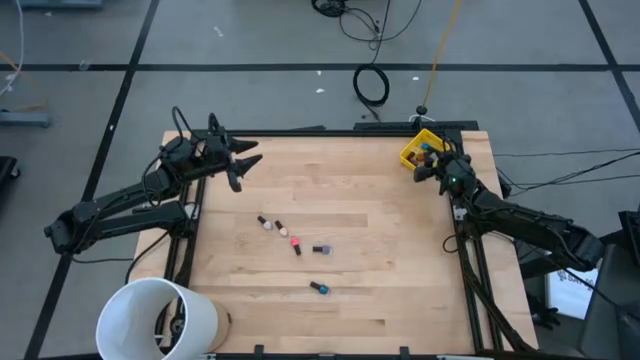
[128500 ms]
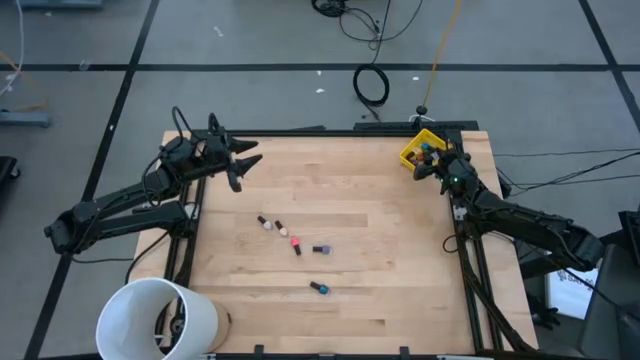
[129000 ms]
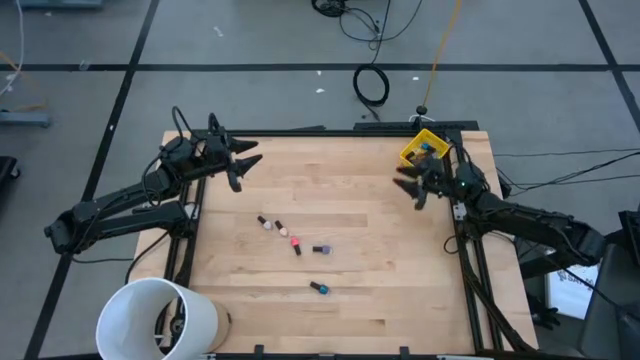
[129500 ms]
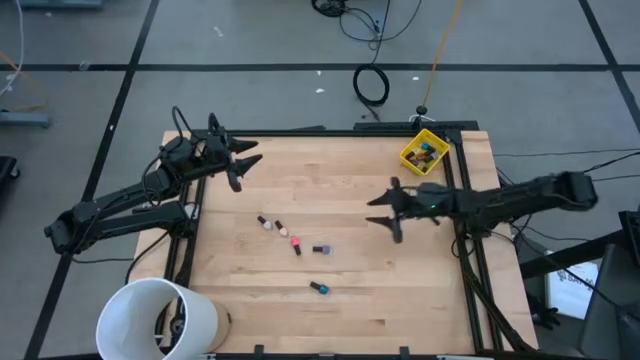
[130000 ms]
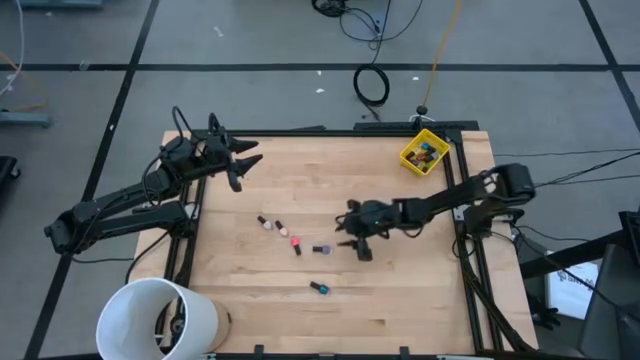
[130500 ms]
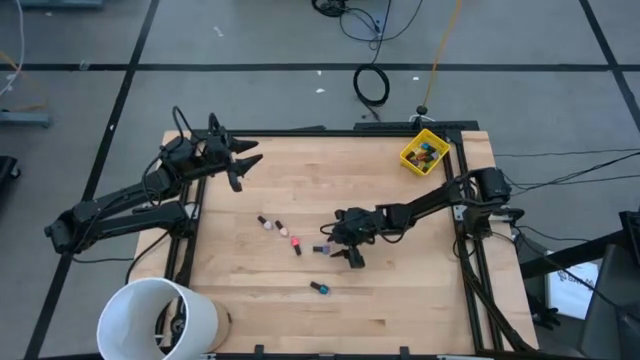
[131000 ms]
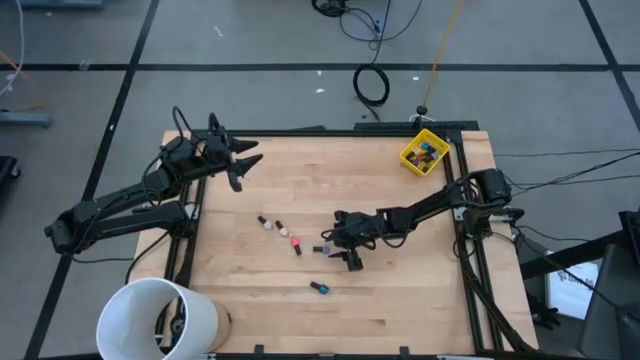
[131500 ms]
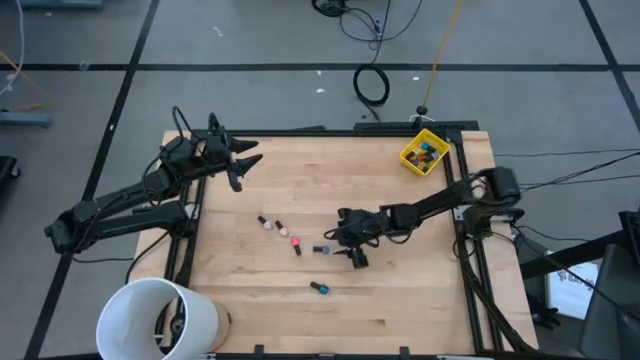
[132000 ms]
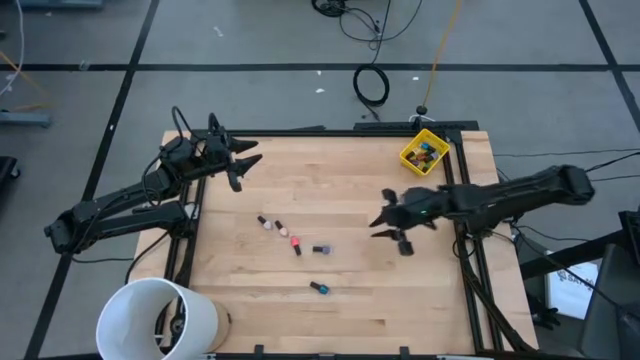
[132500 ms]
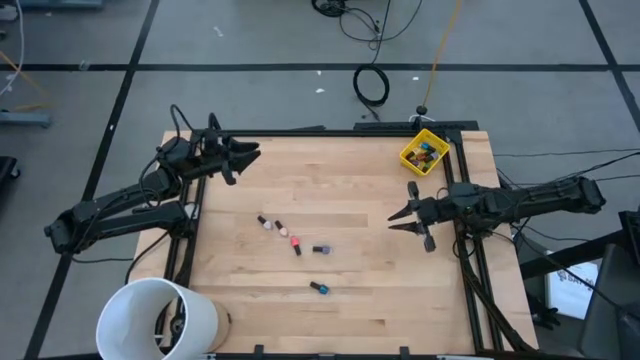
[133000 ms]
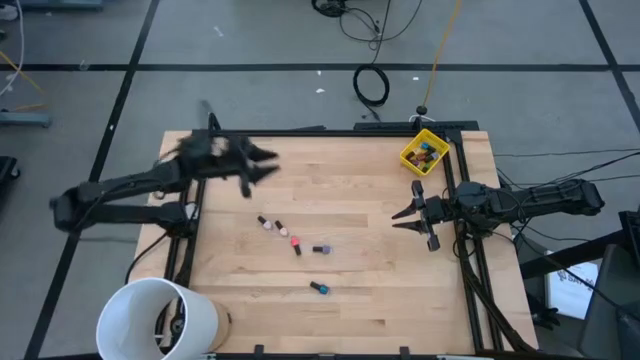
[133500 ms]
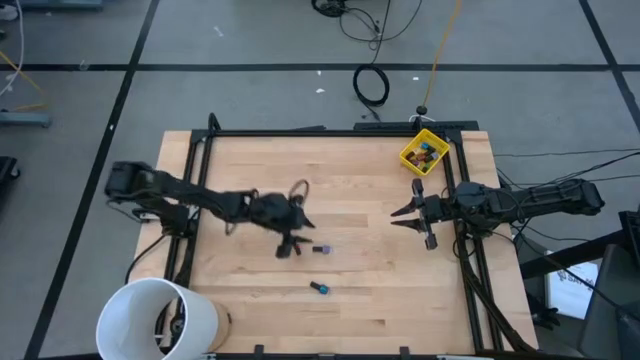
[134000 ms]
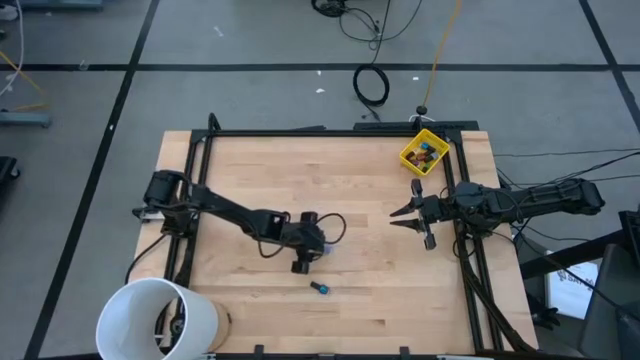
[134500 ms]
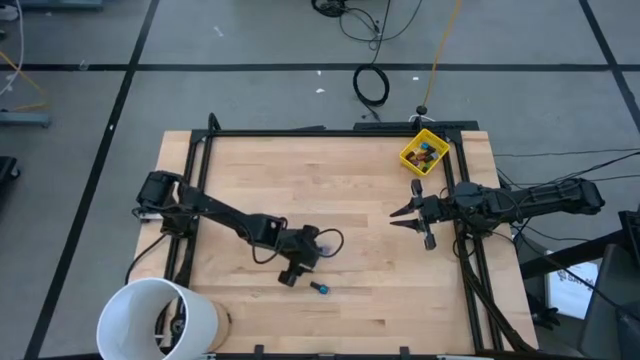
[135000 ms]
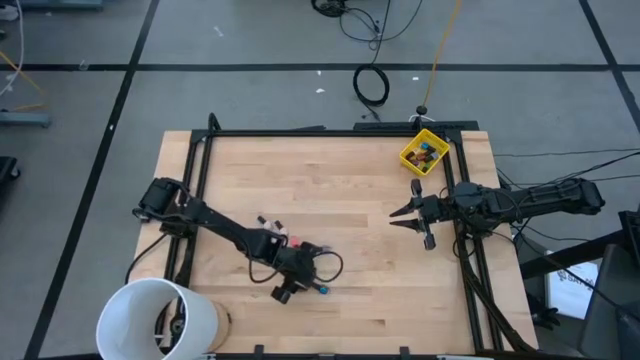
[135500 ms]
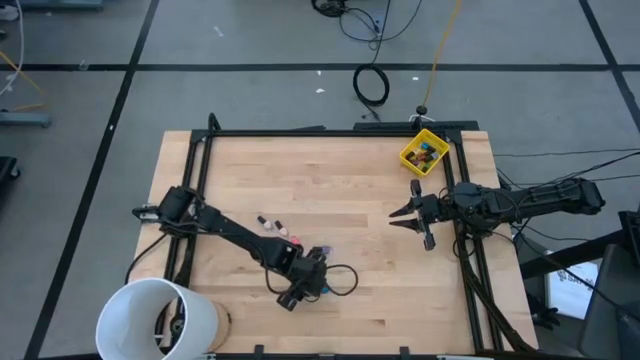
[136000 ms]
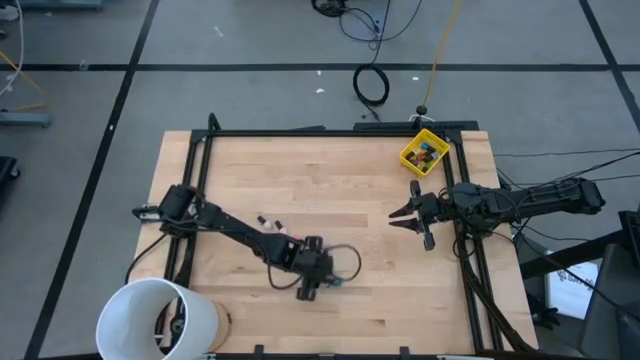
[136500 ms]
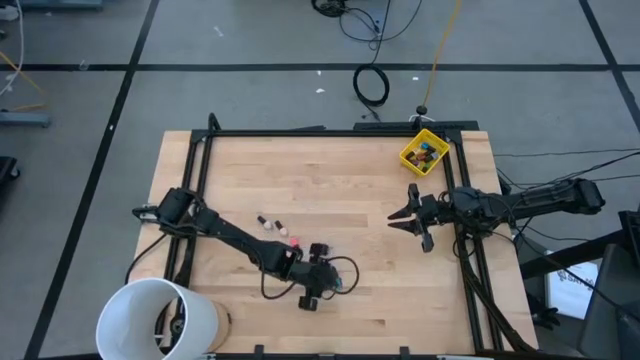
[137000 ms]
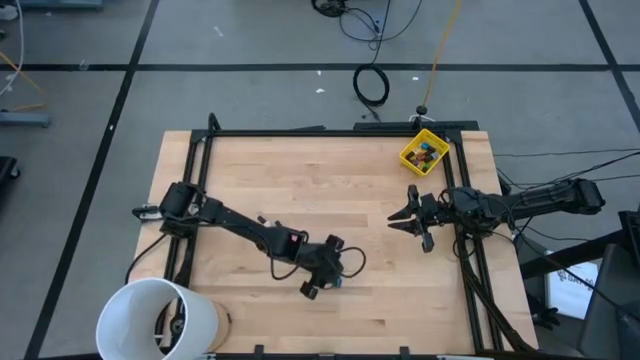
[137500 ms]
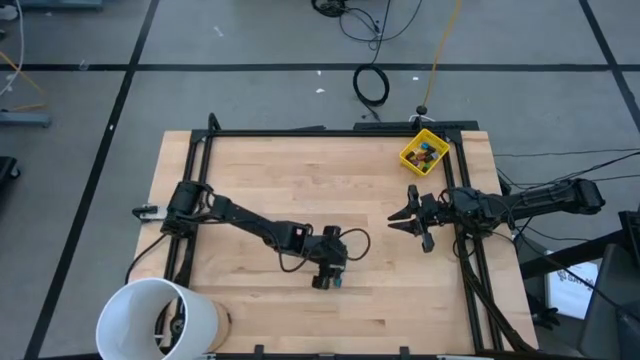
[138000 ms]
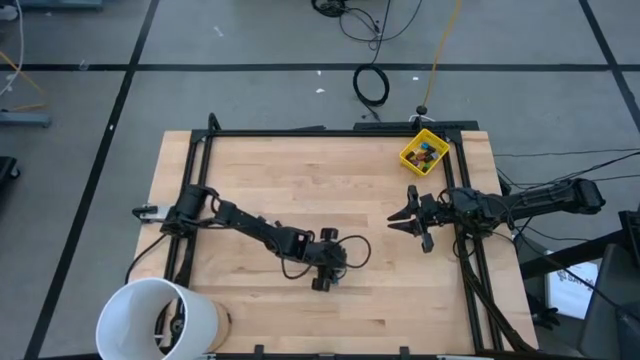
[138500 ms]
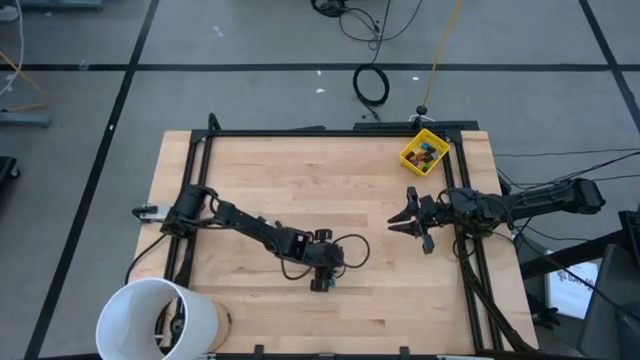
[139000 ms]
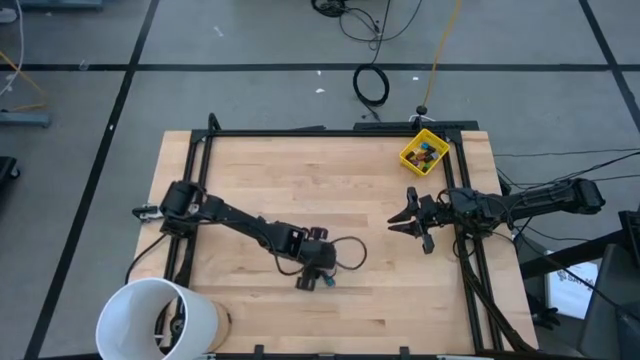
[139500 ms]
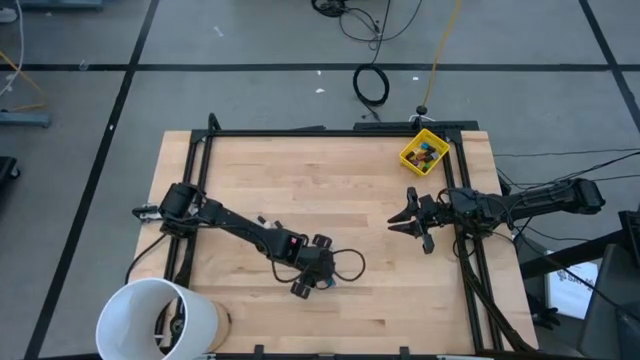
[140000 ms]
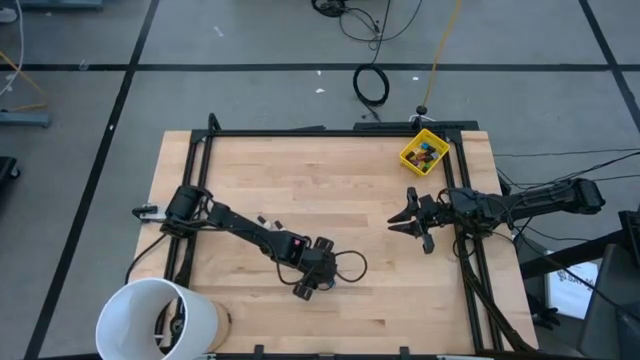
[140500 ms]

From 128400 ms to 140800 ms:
Task: Pick & Place Nail Polish
Put the dark blue nail polish bottle into the yellow bin

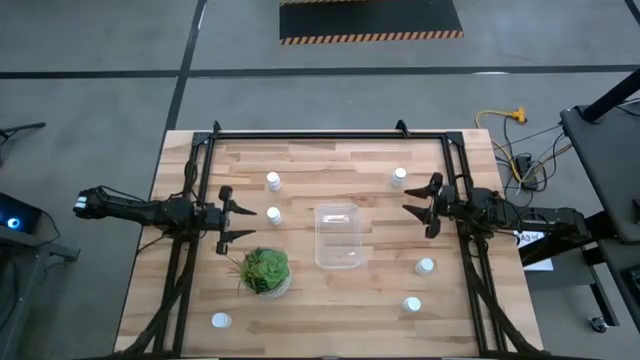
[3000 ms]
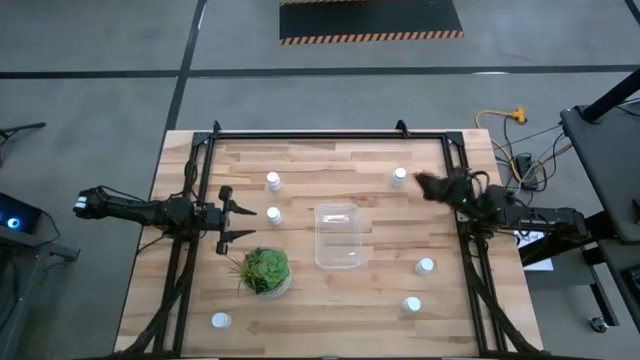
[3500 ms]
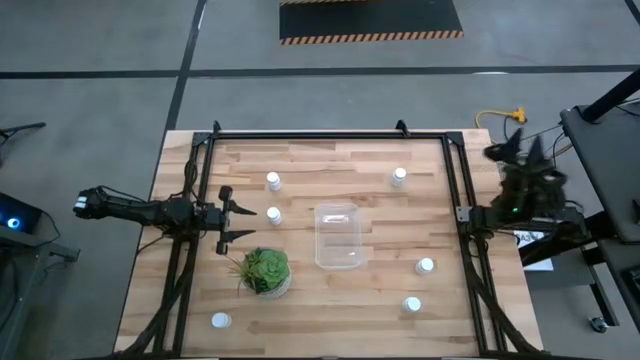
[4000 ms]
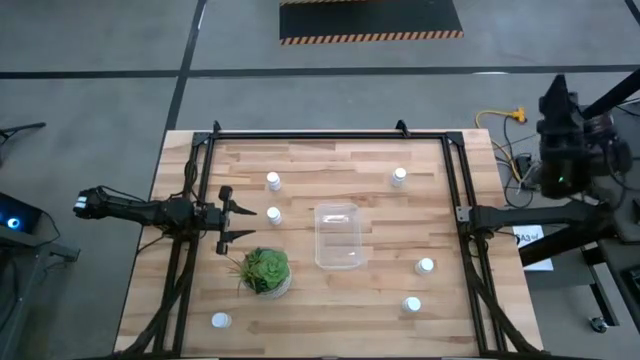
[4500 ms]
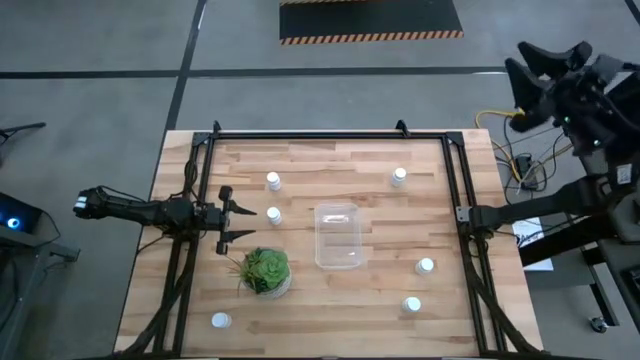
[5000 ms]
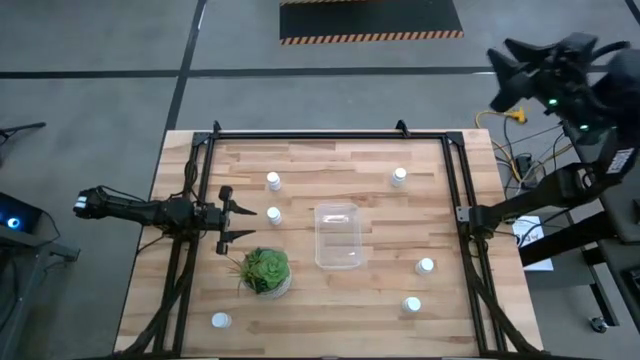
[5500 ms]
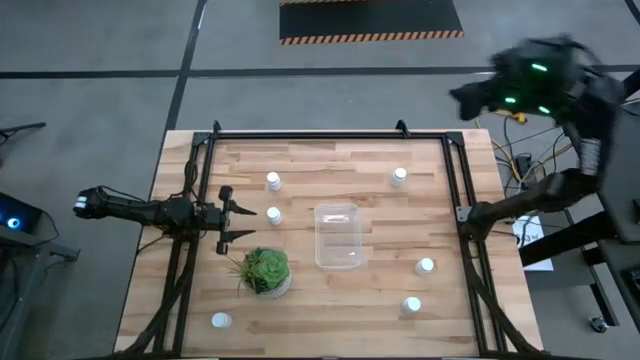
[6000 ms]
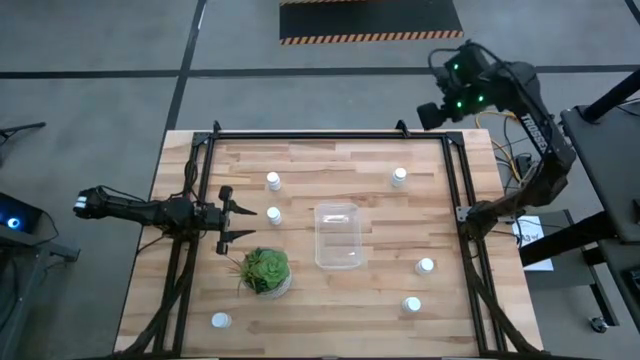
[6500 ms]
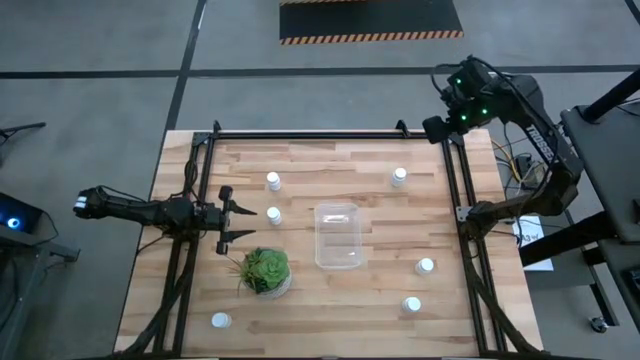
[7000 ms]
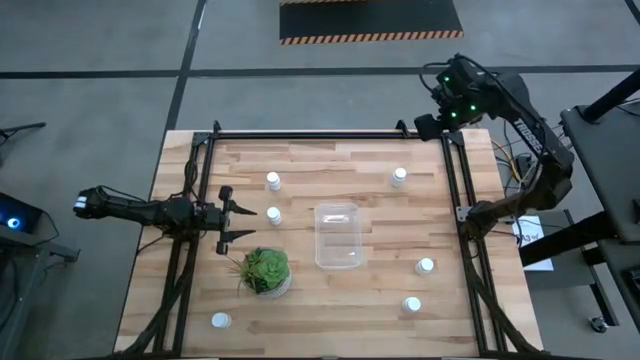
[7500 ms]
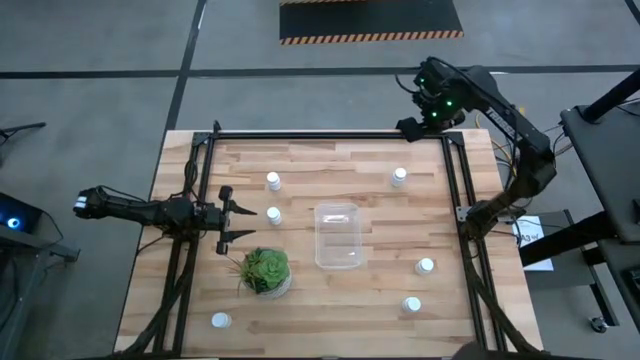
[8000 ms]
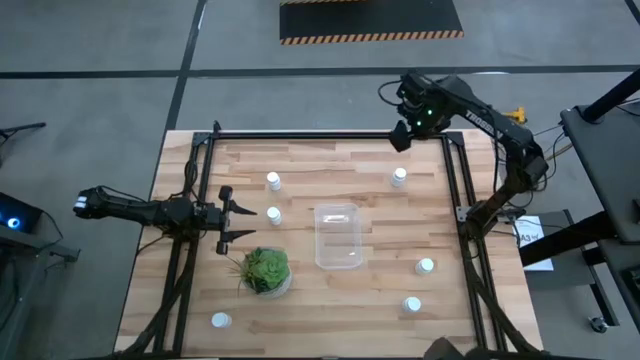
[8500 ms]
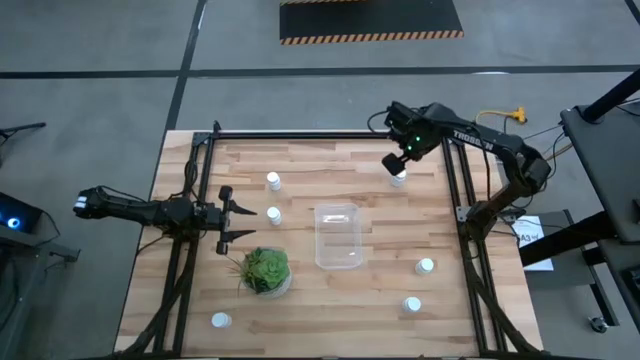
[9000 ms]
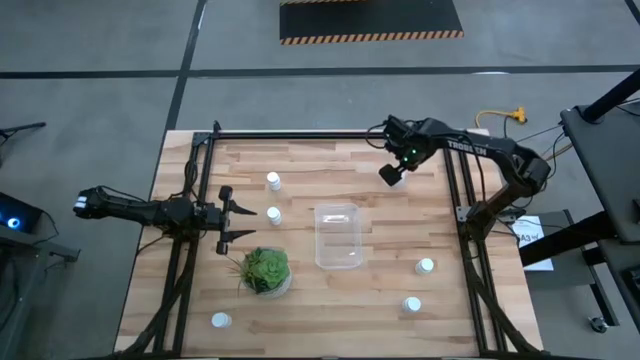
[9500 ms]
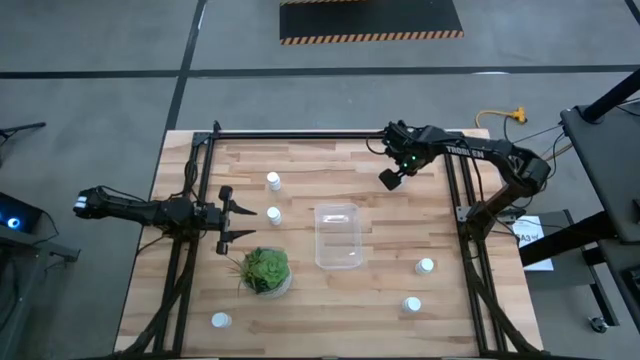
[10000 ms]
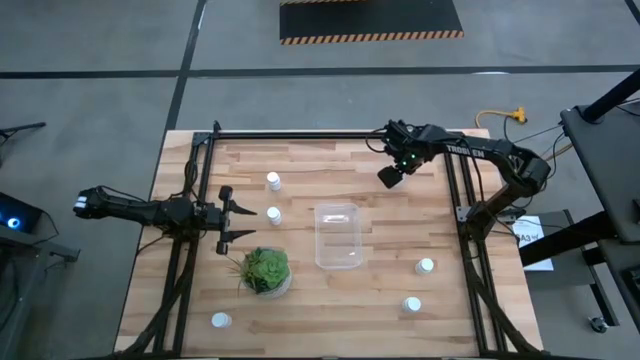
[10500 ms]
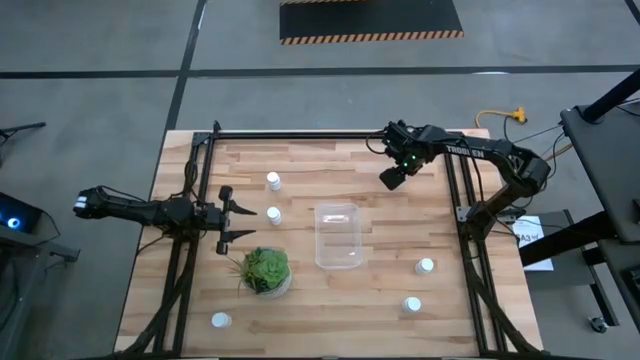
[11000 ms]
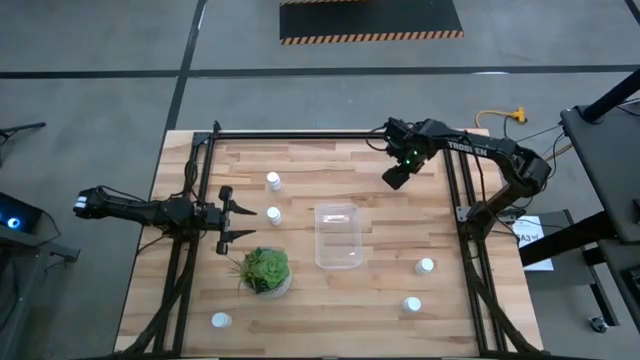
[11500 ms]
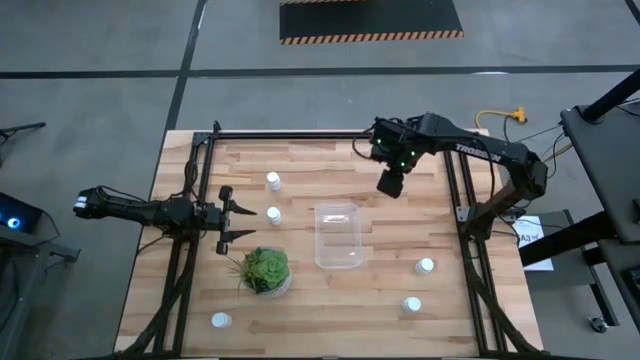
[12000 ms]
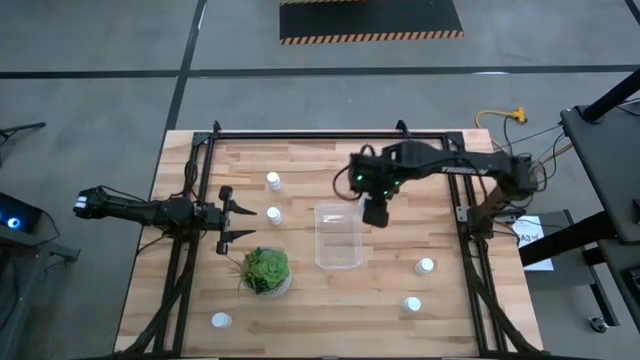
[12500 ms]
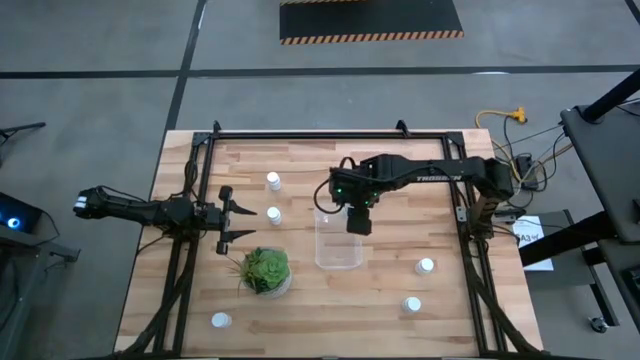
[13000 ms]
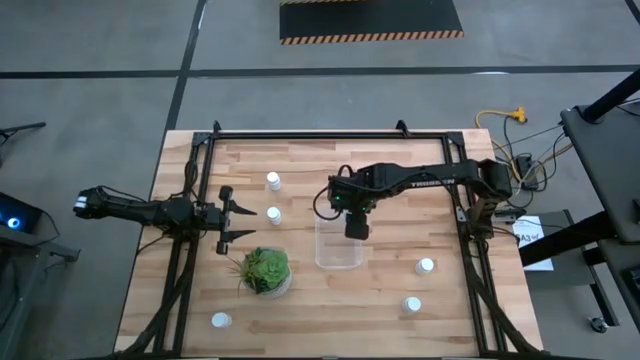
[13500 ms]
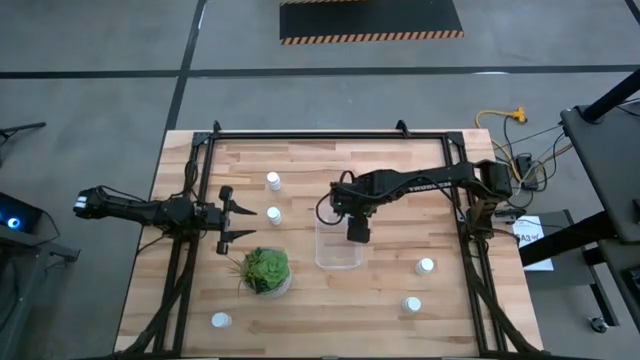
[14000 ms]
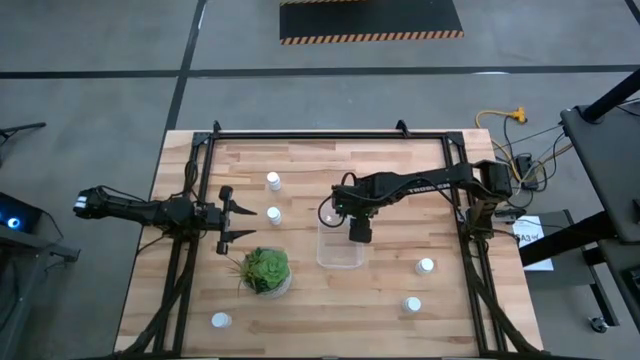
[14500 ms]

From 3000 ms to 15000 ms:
Task: Pick and place pill bottles into a basket
Put the white medicine bottle into the transparent bin
